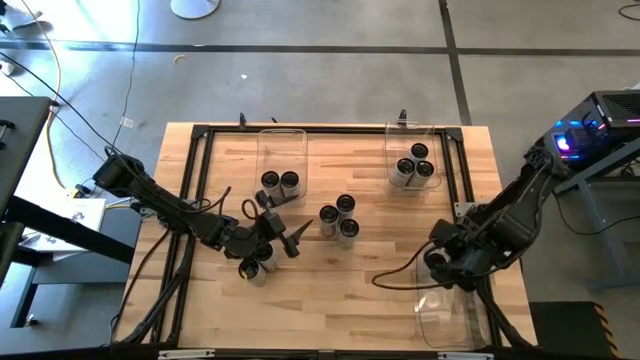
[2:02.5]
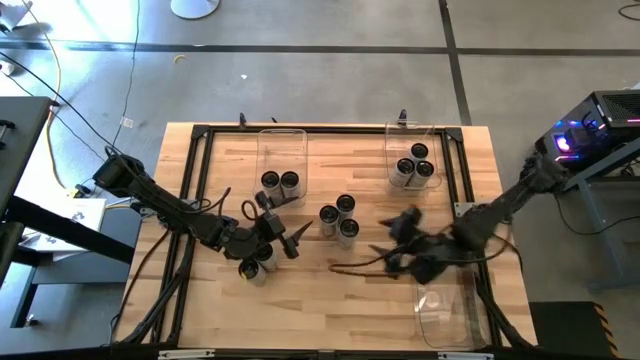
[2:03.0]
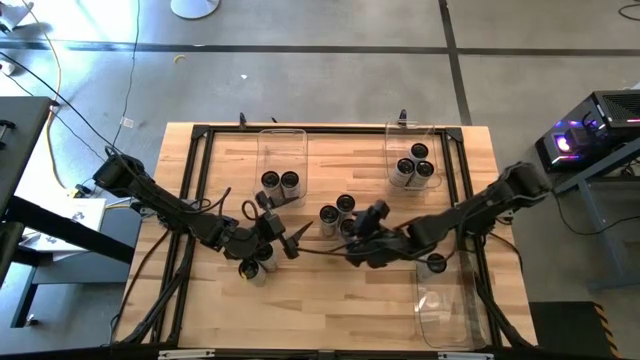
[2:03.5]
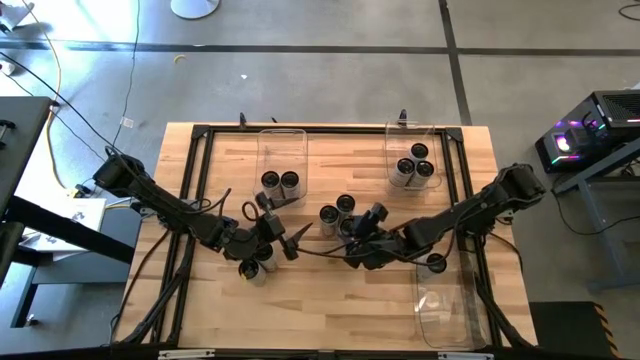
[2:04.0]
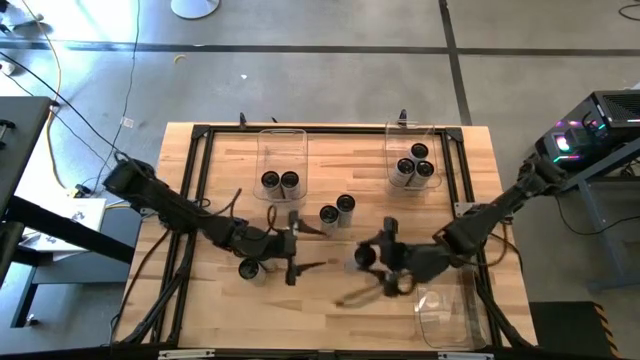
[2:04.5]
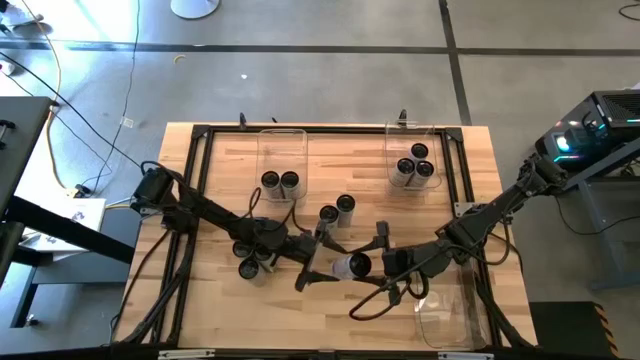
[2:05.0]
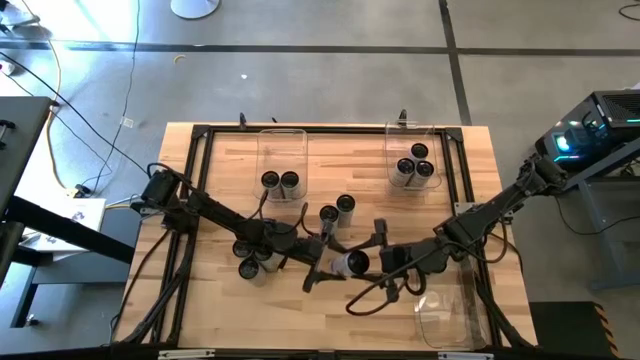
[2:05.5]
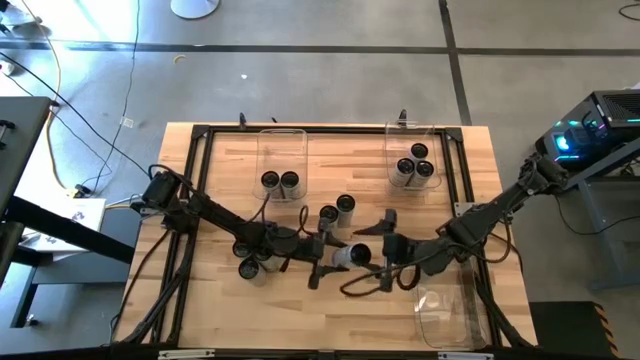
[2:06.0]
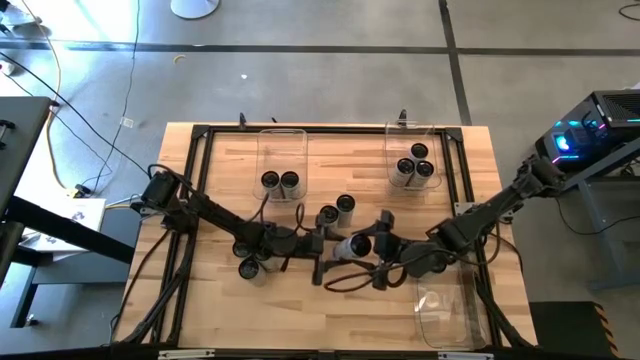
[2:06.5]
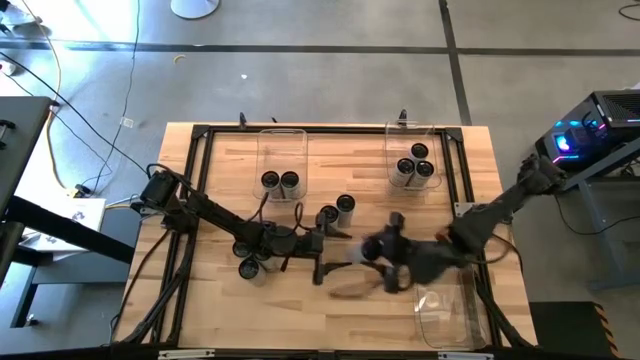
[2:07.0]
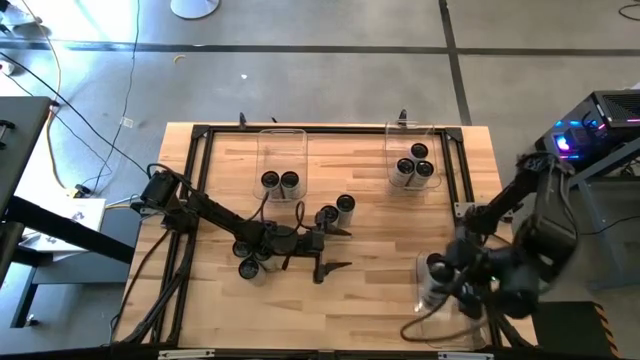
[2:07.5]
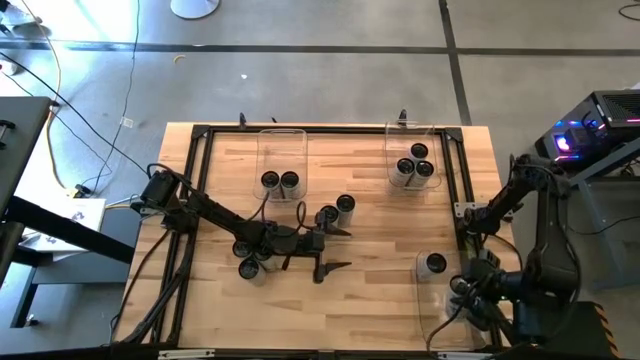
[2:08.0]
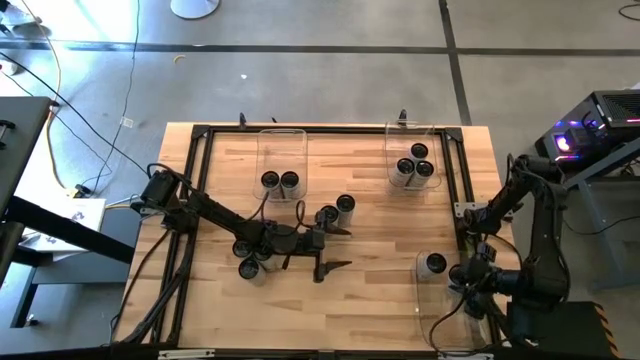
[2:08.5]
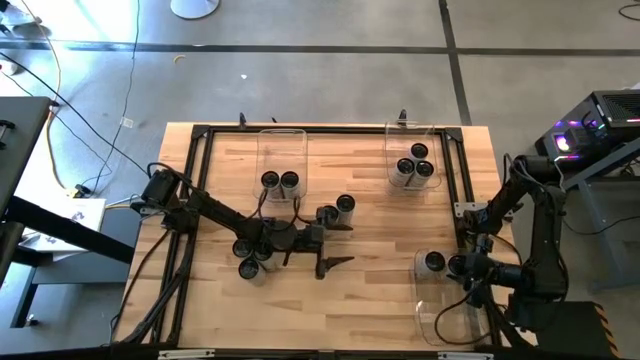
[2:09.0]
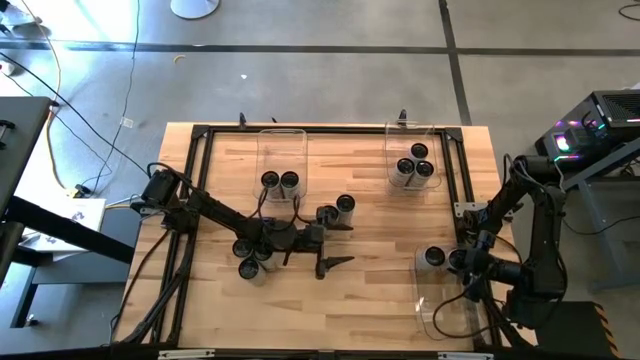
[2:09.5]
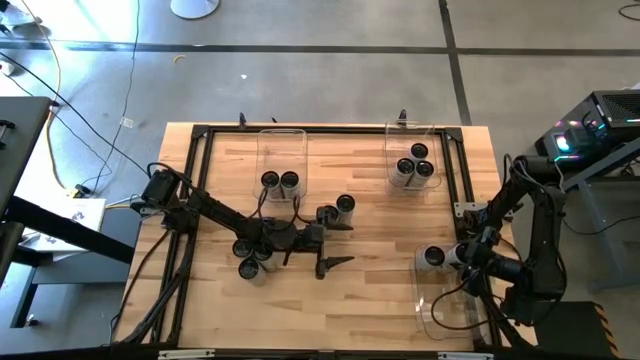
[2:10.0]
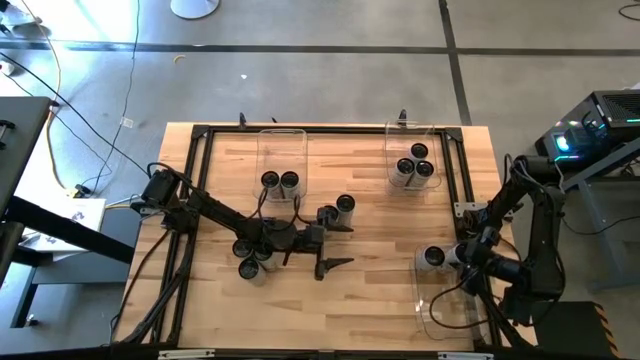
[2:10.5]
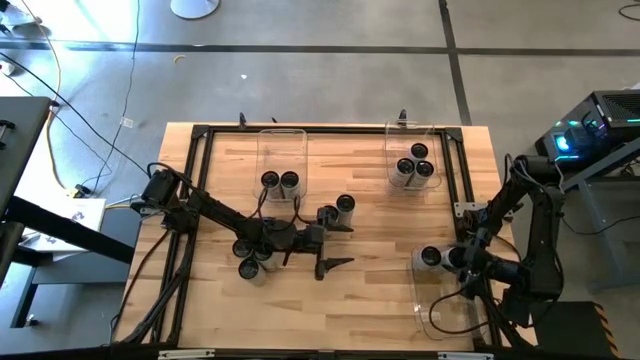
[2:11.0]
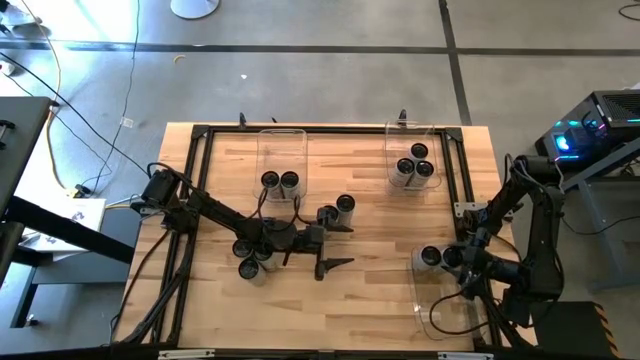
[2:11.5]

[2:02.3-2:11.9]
Task: Sort soda cans
Put the white-blue soda can into the bottom transparent bin

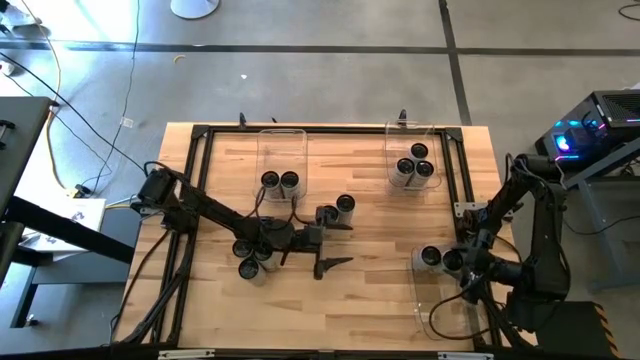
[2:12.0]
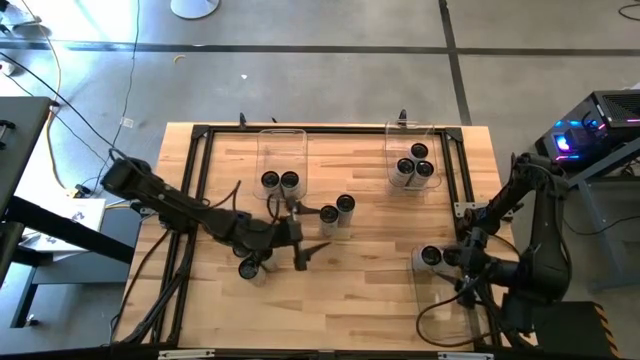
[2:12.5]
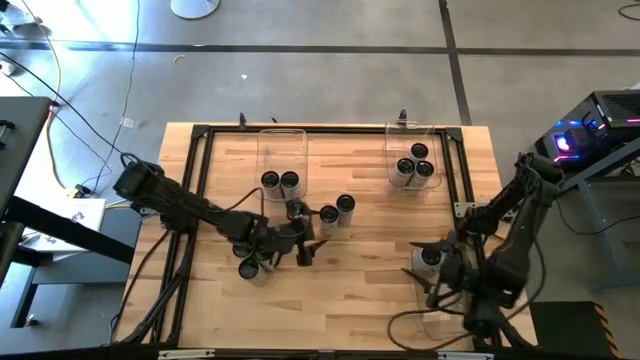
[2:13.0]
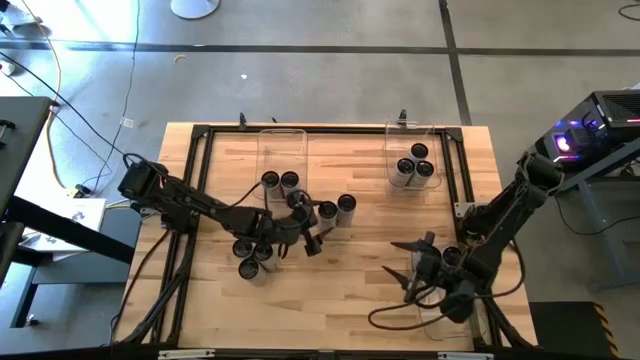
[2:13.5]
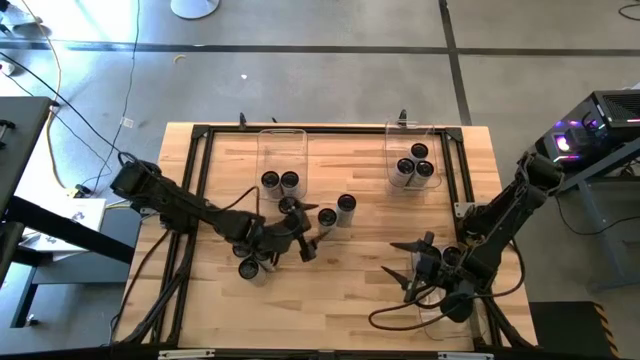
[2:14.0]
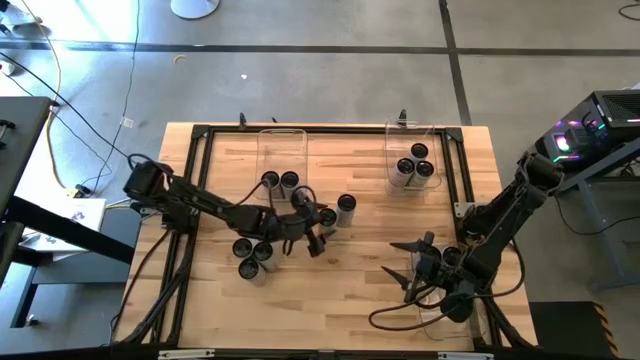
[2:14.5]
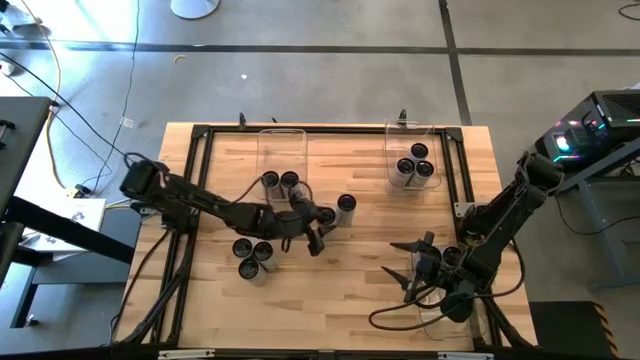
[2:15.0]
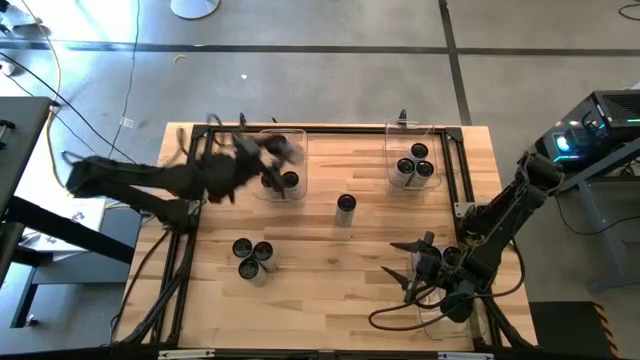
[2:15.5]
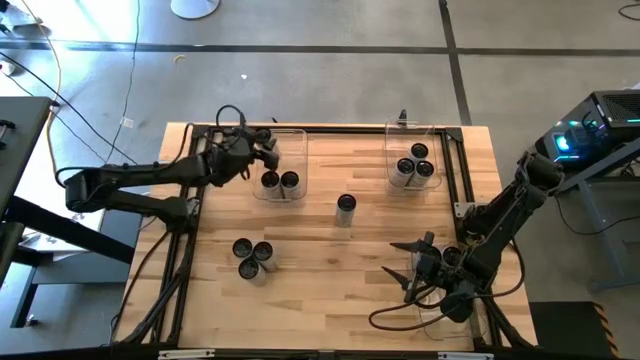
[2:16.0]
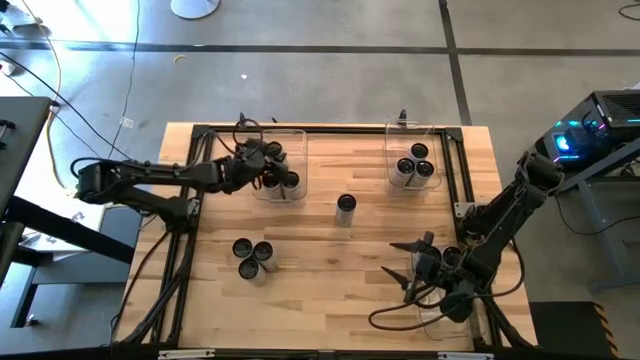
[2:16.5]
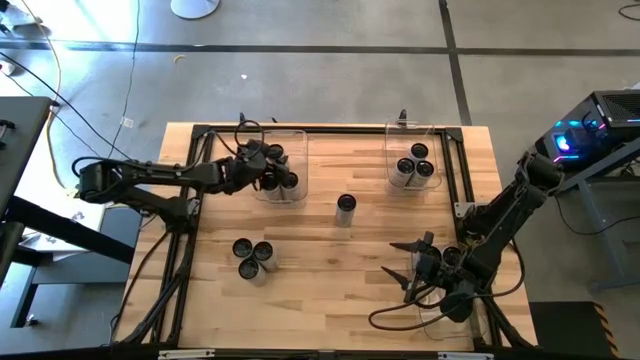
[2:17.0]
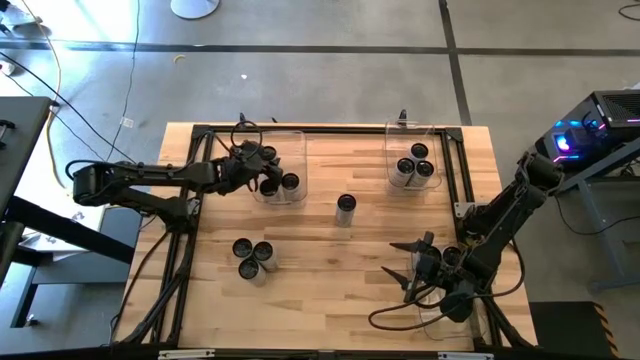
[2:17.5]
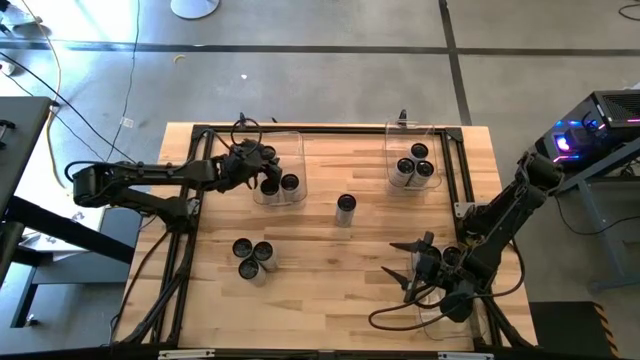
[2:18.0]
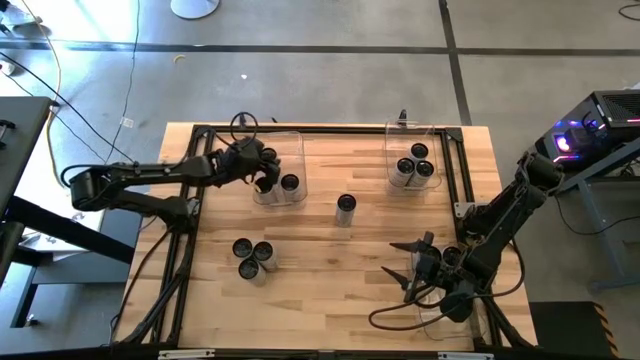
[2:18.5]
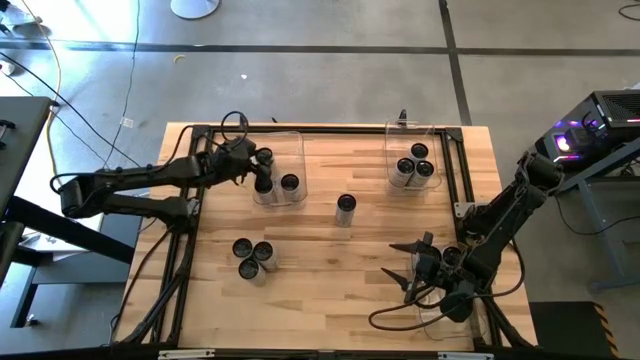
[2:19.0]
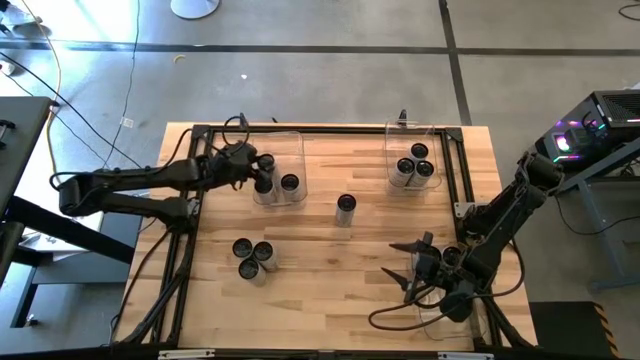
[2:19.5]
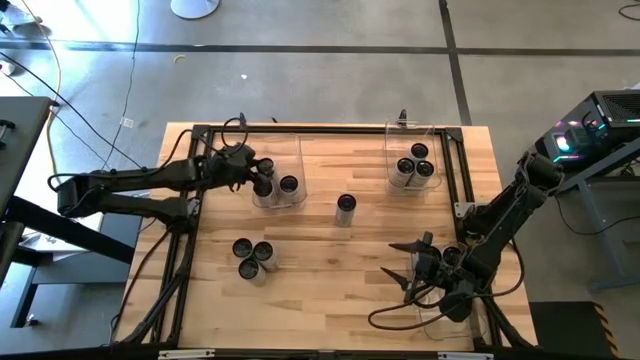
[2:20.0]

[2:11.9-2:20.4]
Put the white-pink soda can into the top left transparent bin

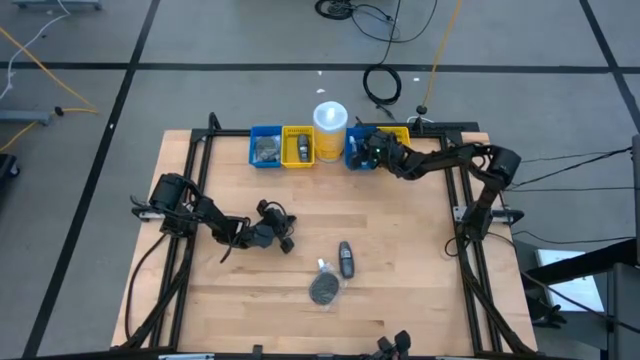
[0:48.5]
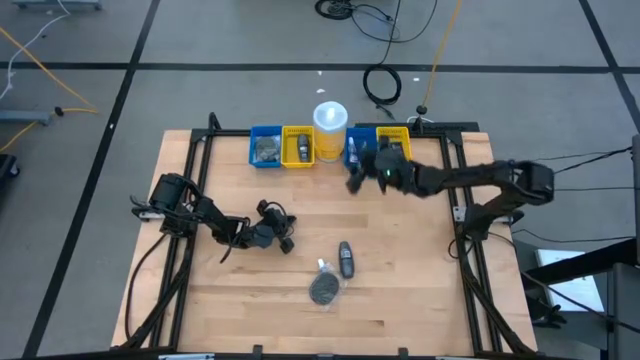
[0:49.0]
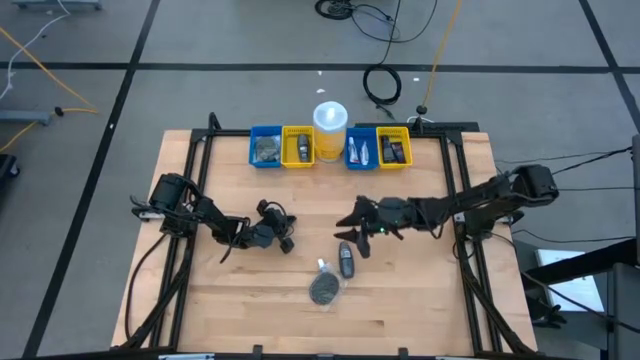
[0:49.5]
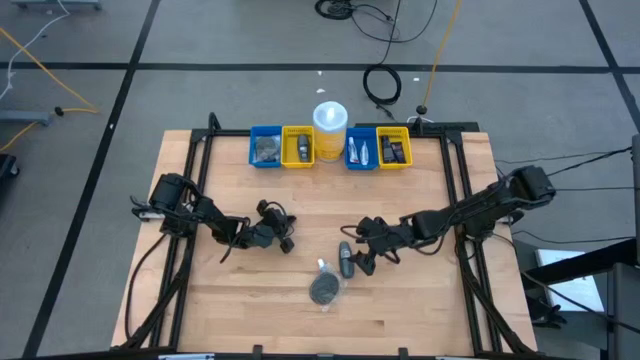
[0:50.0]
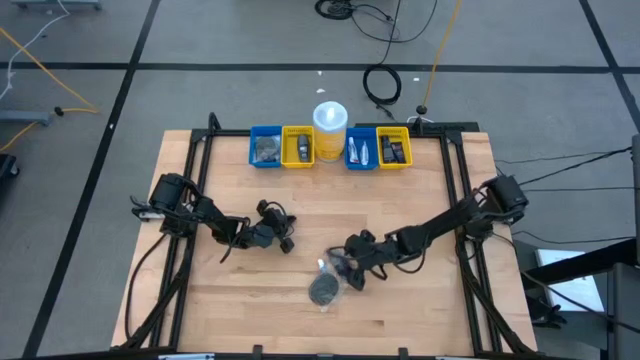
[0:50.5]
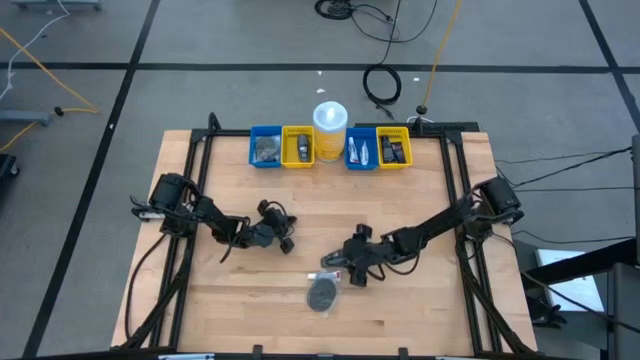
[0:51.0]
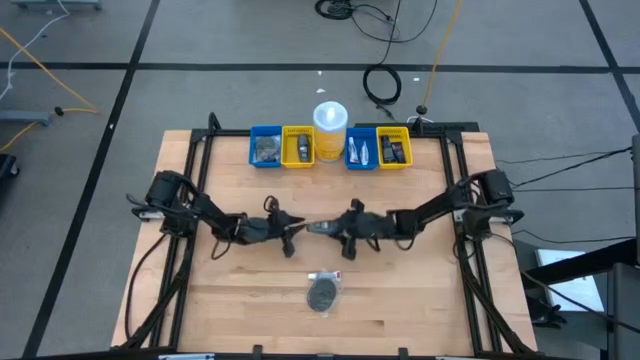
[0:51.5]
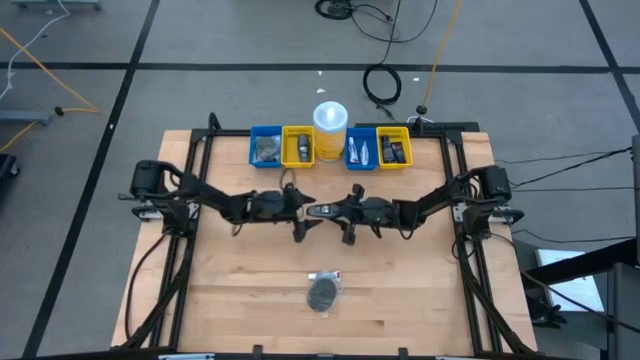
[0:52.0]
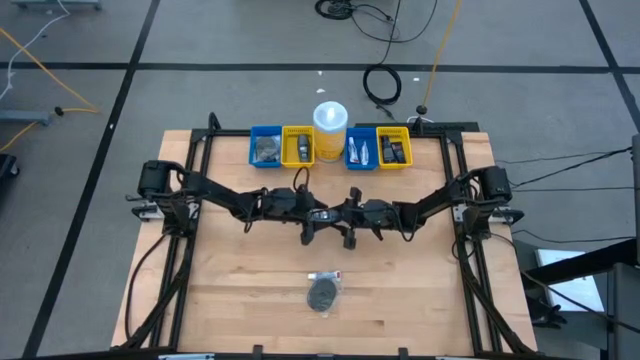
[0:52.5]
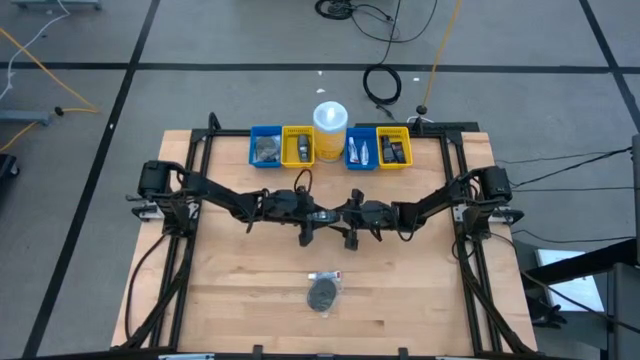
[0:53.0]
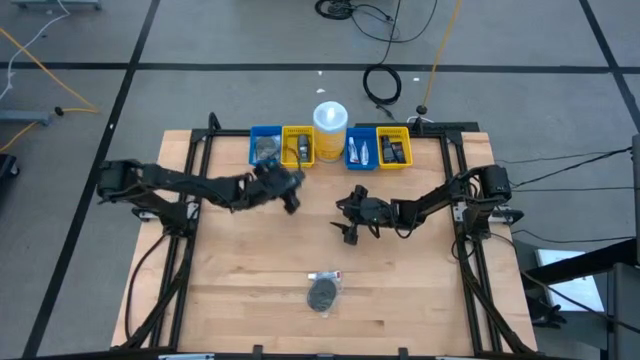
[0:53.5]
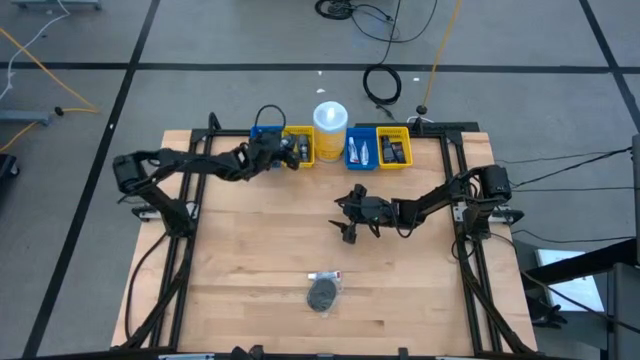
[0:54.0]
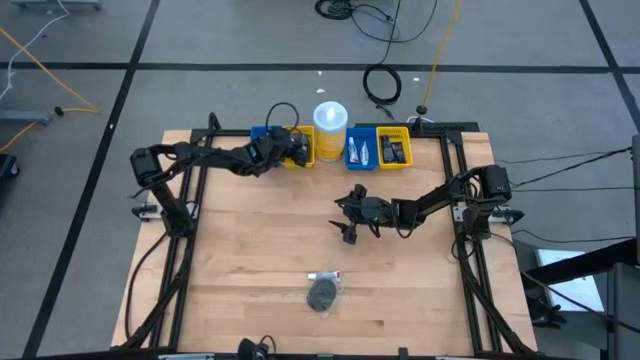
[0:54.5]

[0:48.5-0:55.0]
Task: Pick & Place Travel size toiletries
Put the gray deodorant into the left yellow bin
